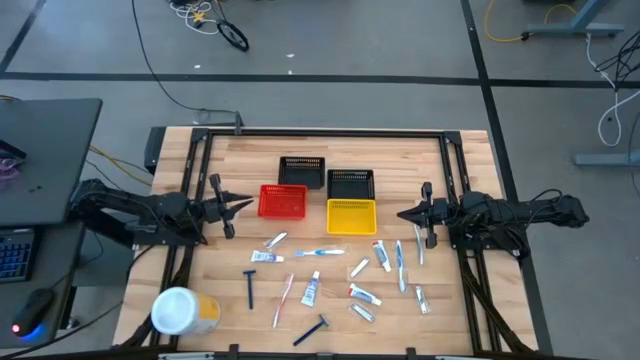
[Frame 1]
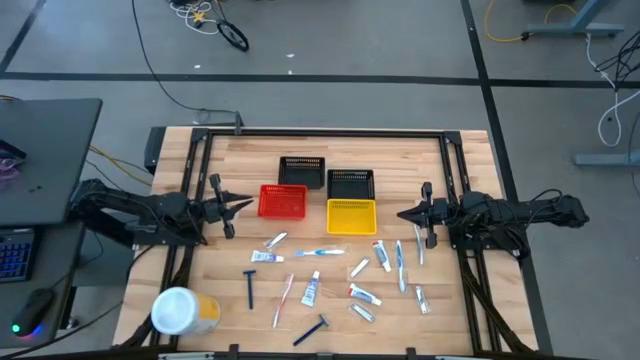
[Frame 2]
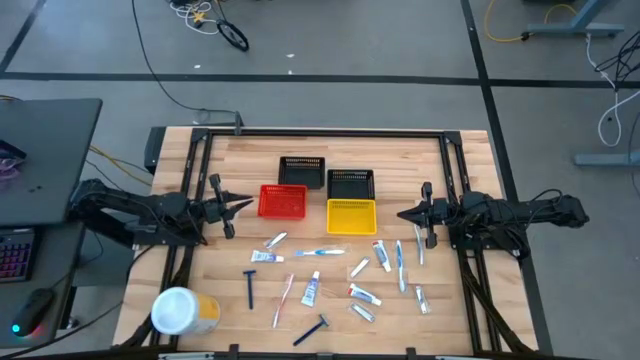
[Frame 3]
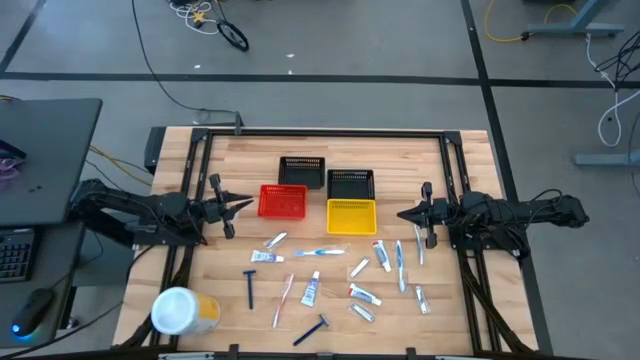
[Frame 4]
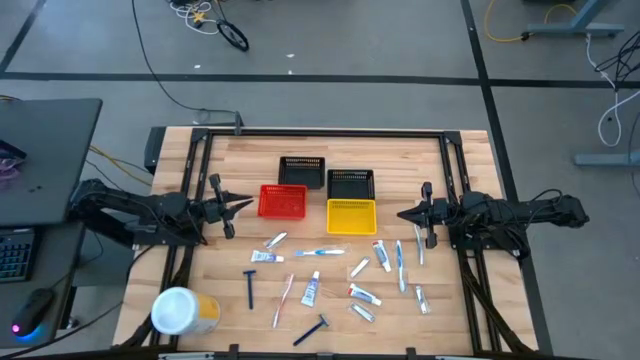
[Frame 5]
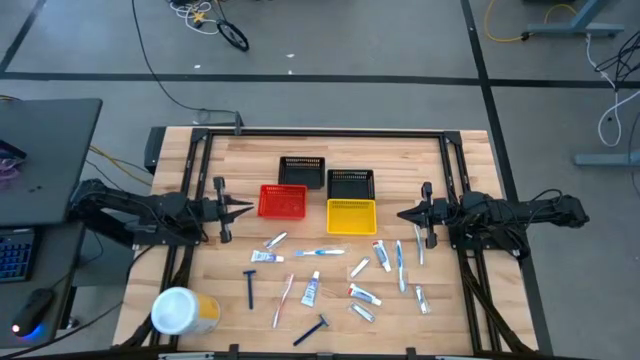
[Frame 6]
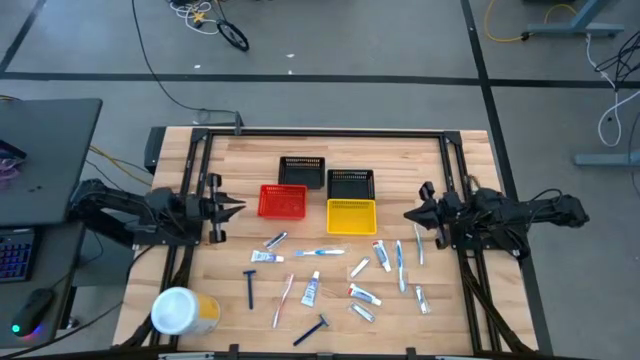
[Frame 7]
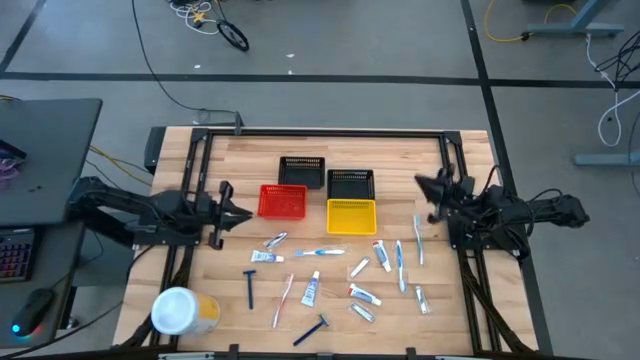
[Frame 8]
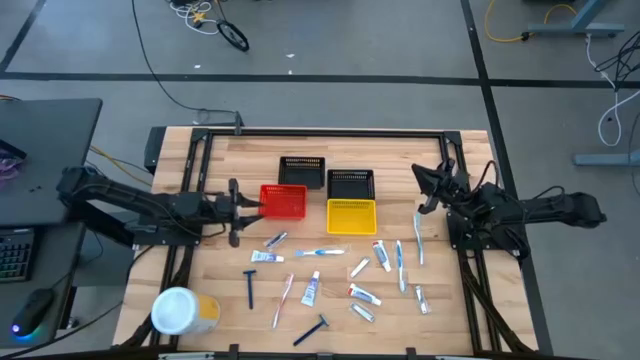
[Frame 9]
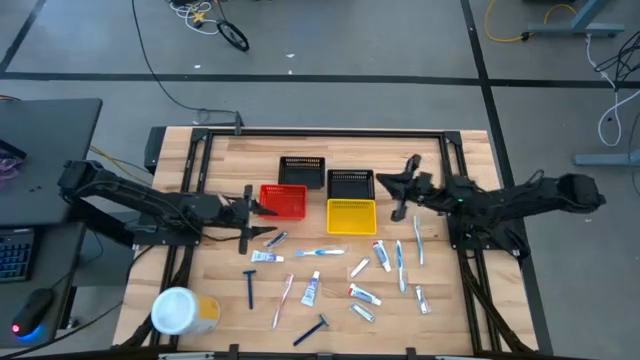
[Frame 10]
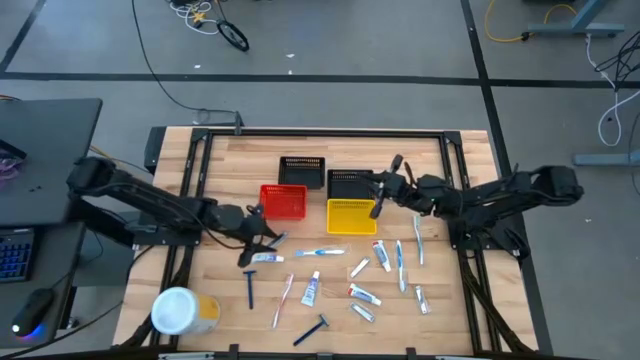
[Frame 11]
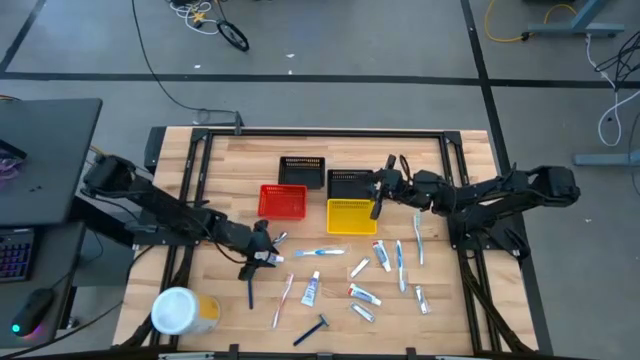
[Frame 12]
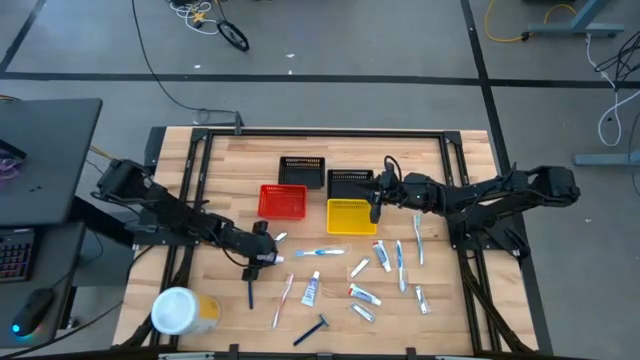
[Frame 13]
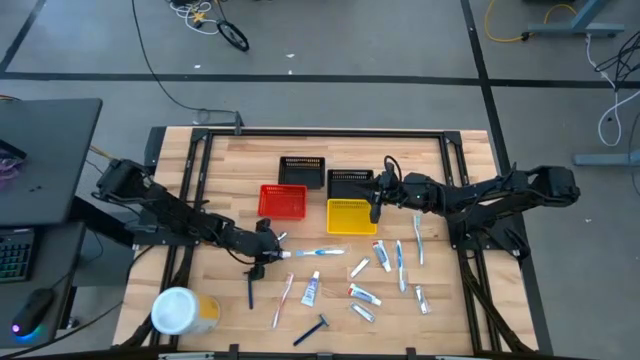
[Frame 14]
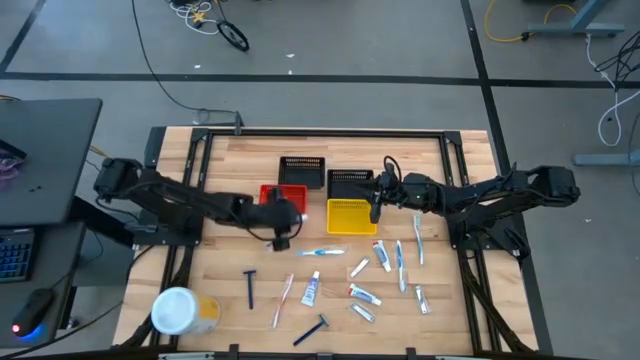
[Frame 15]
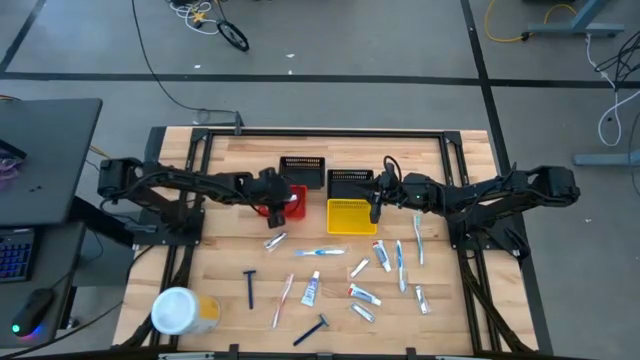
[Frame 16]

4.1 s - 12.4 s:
Task: Pick & Place Travel size toiletries
Put the white toothpaste into the red bin

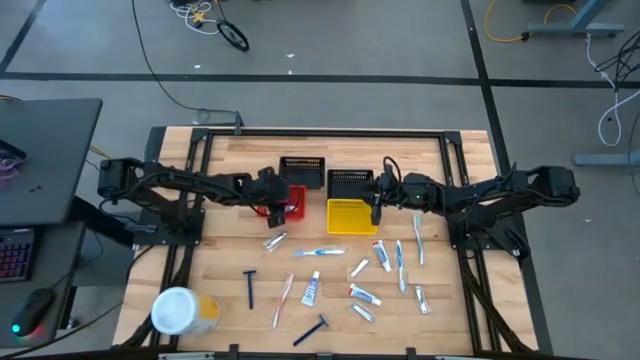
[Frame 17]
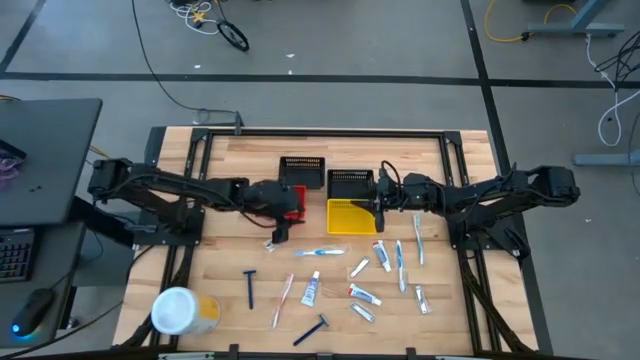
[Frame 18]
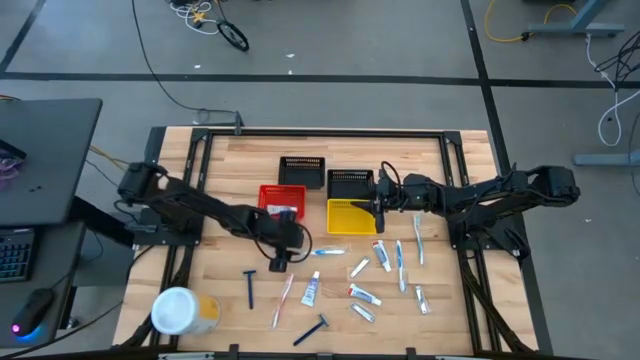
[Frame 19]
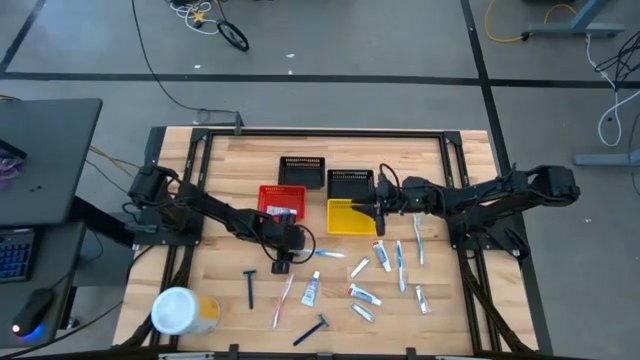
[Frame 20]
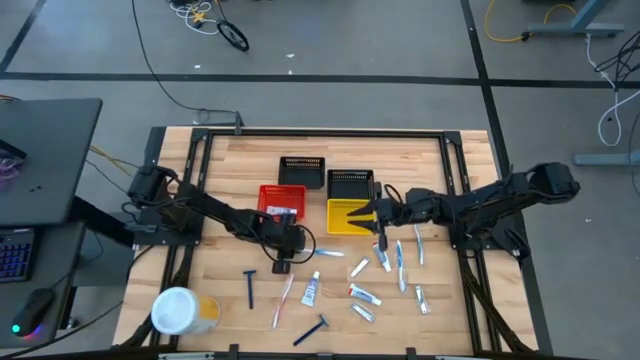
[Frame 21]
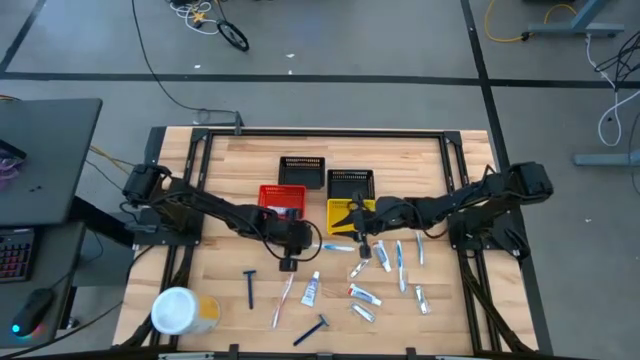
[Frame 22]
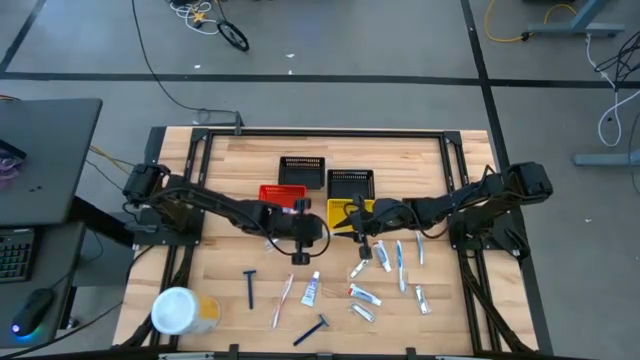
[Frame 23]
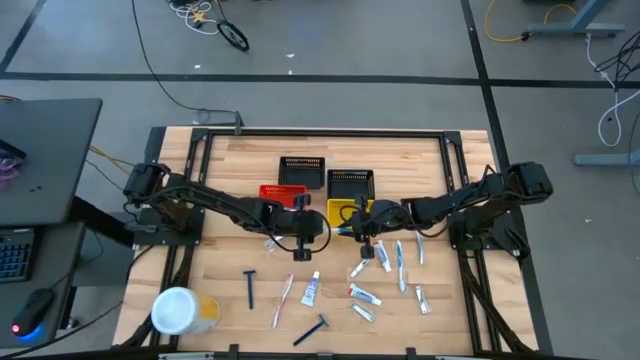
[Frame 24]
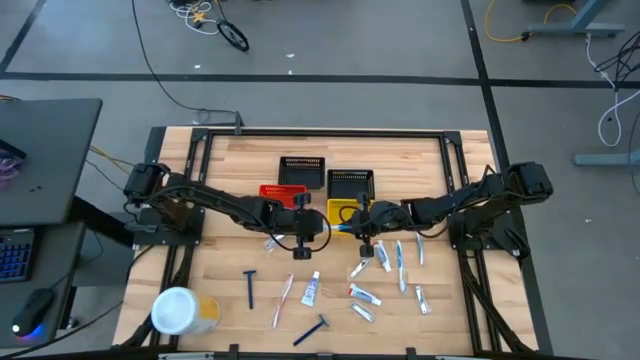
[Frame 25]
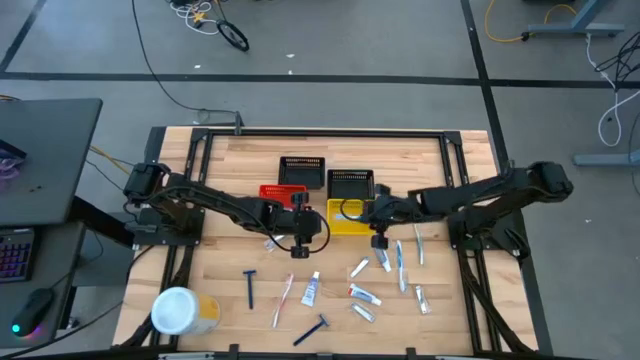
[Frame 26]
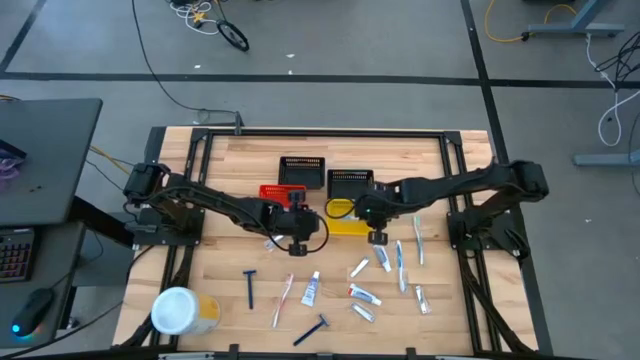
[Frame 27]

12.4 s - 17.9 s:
Put the blue toothbrush into the yellow bin

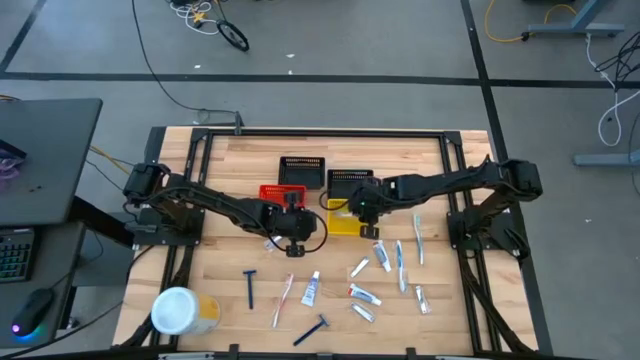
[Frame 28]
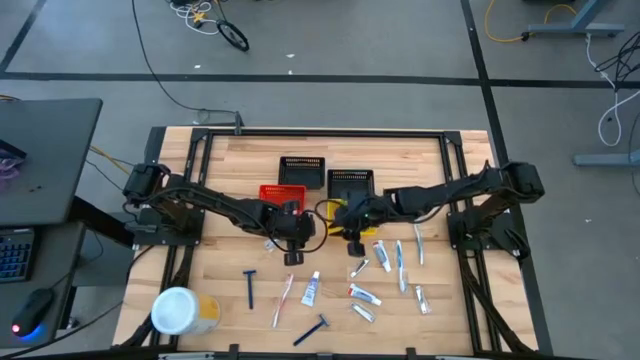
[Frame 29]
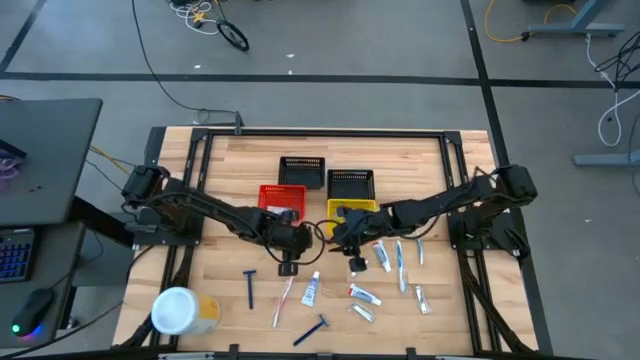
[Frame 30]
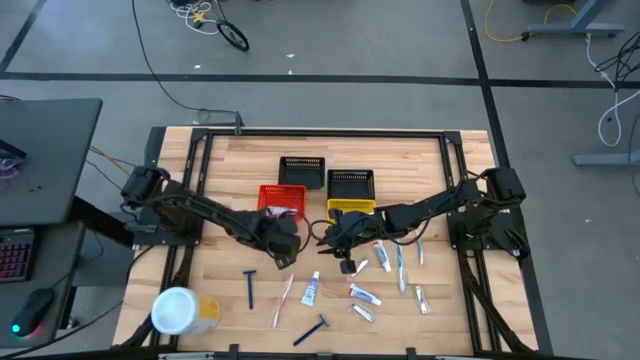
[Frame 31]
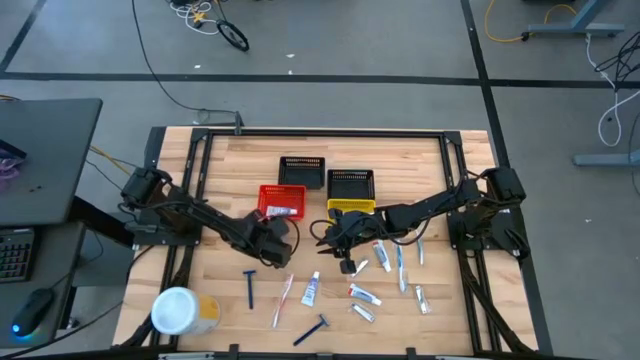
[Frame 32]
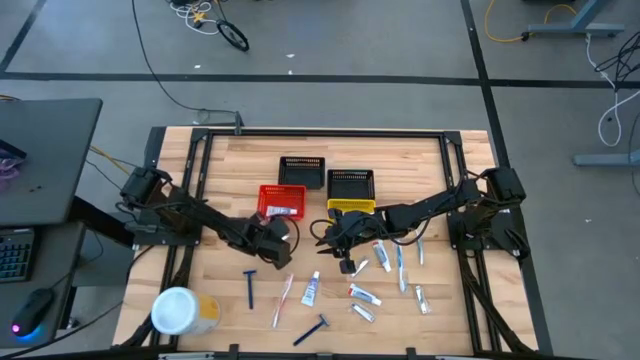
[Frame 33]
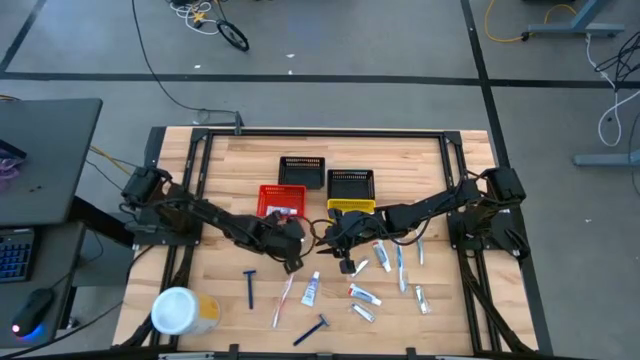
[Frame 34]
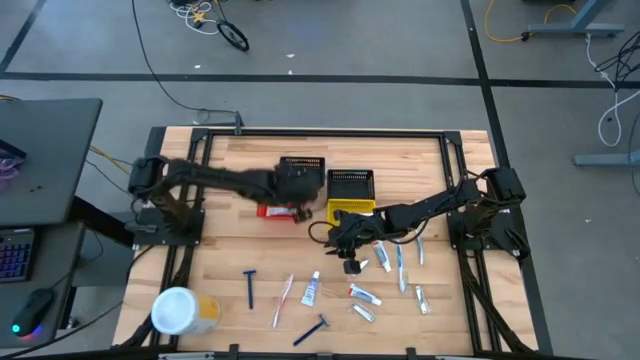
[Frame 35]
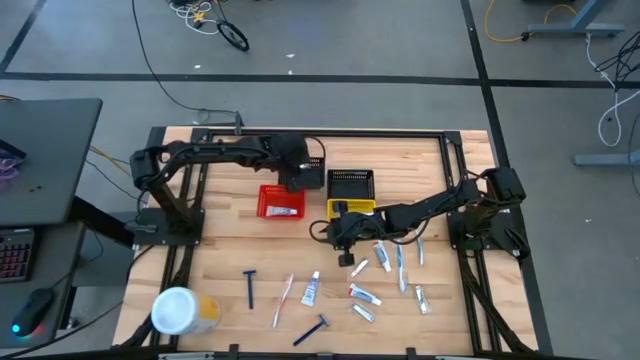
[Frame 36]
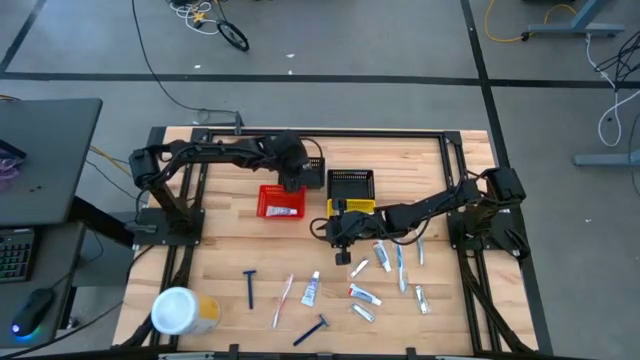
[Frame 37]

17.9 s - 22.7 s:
Put the silver nail cutter into the left black bin

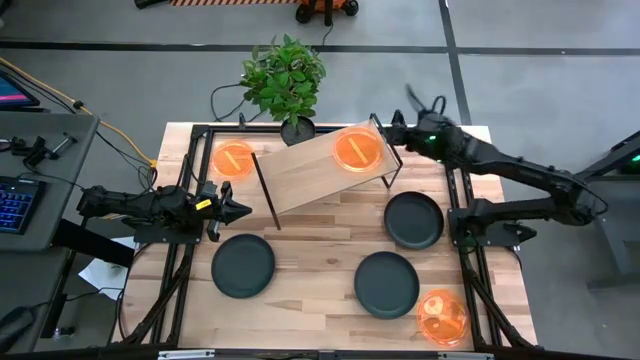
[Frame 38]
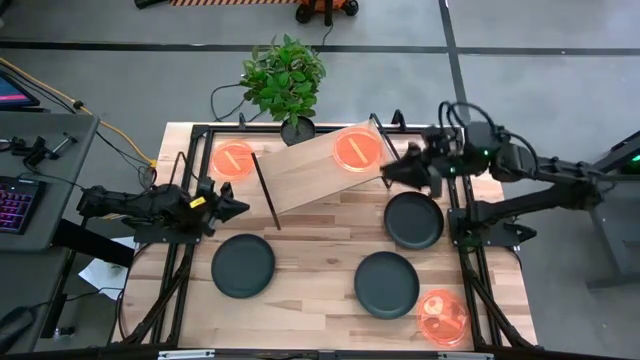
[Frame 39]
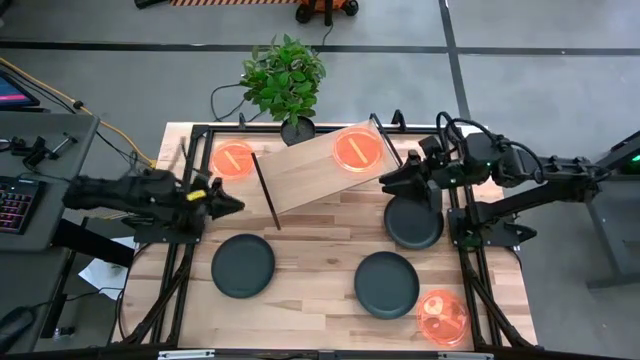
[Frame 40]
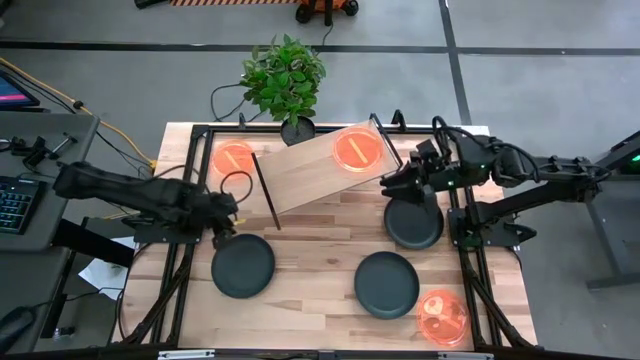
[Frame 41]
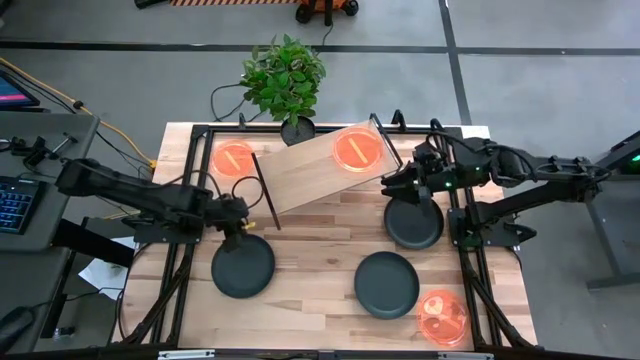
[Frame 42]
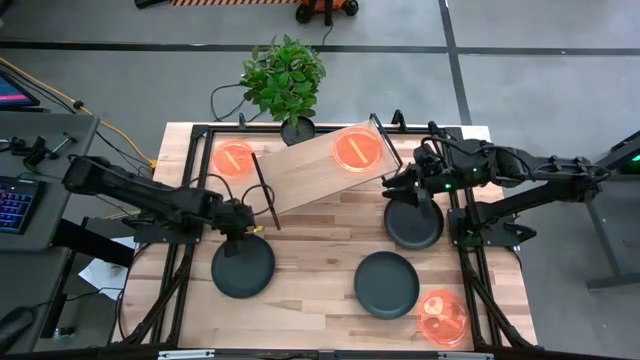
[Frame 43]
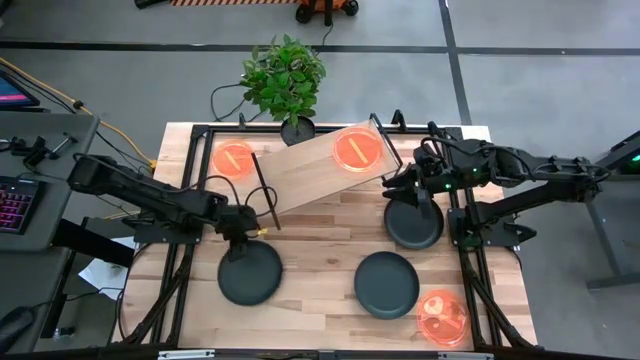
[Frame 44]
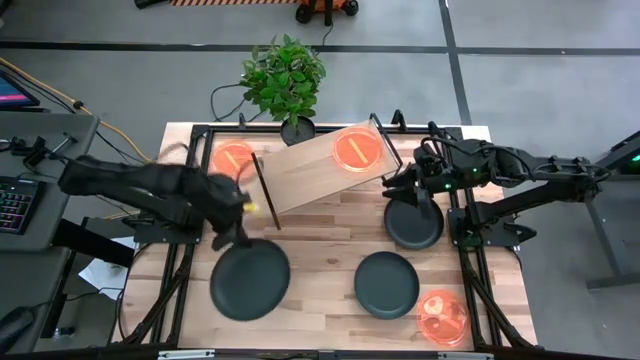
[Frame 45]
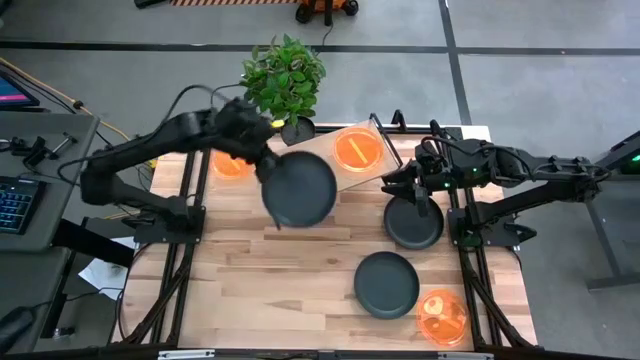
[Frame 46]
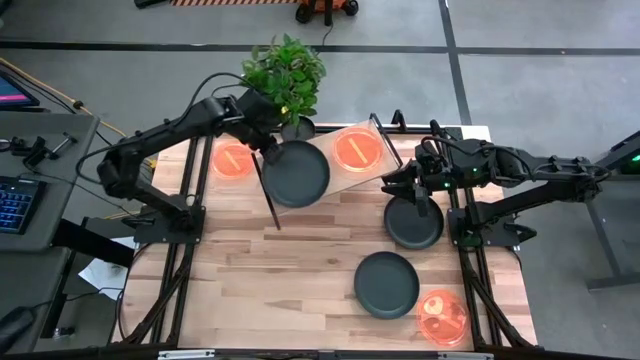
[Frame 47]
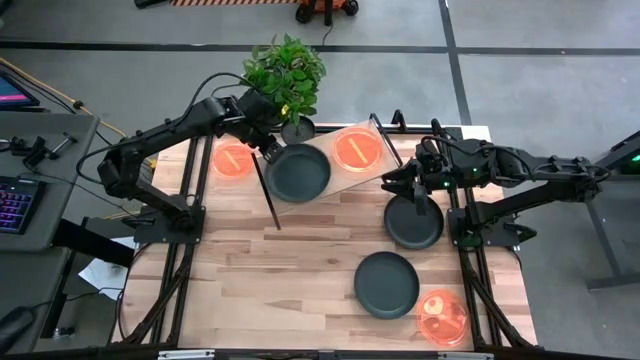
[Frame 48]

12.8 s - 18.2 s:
Task: Place and stack plates onto a shelf
Put the bottom left black plate on the shelf
